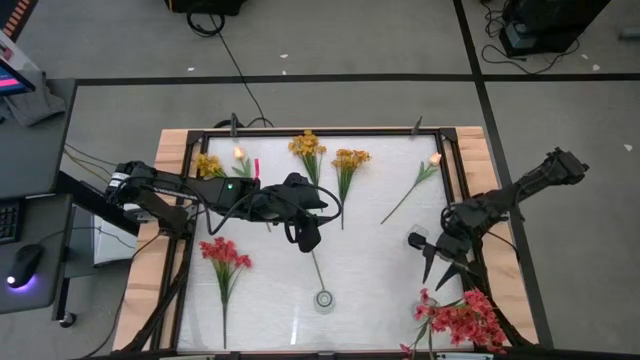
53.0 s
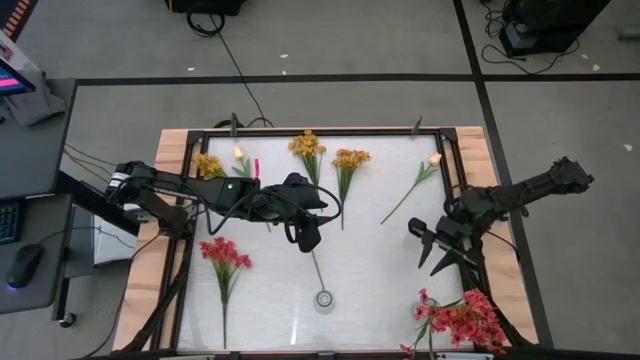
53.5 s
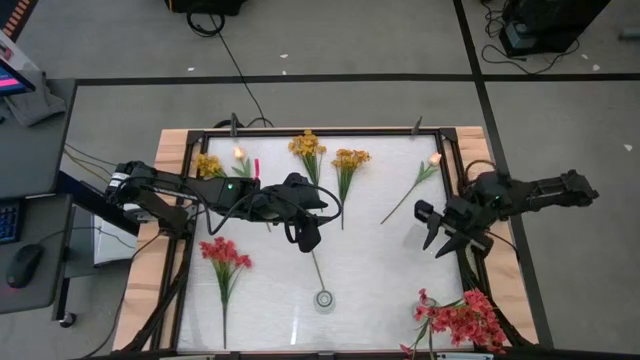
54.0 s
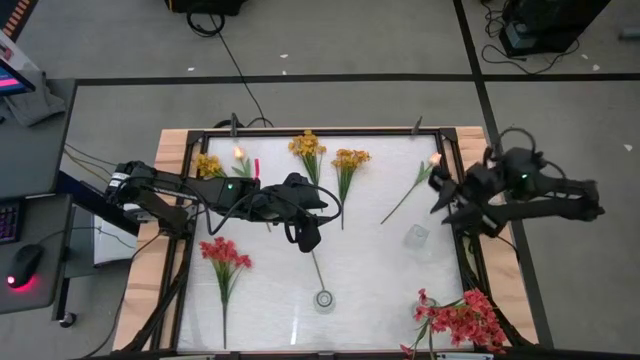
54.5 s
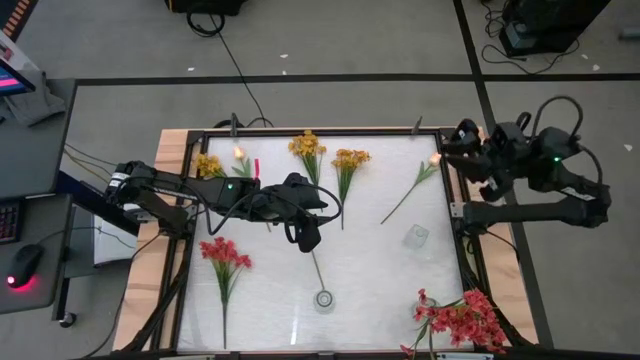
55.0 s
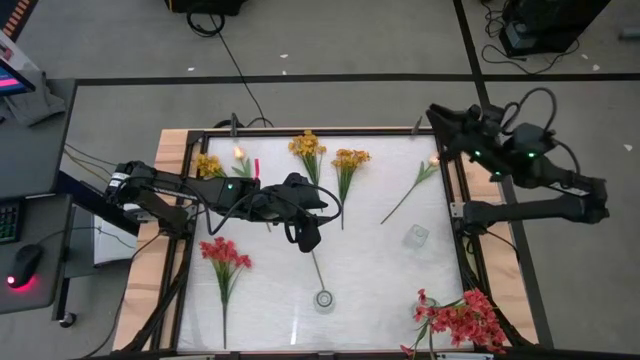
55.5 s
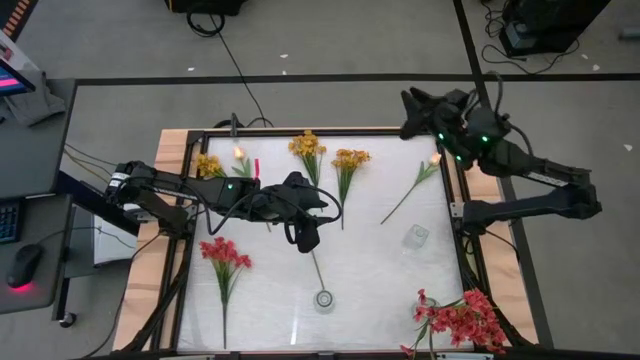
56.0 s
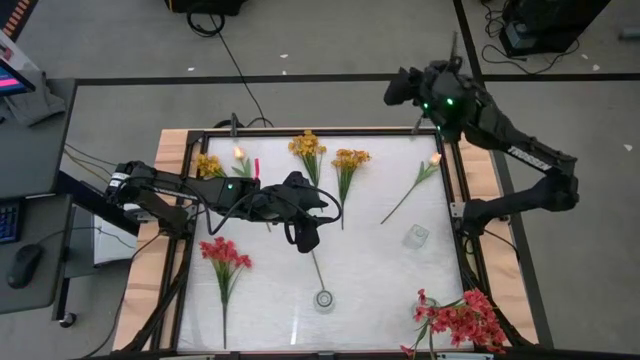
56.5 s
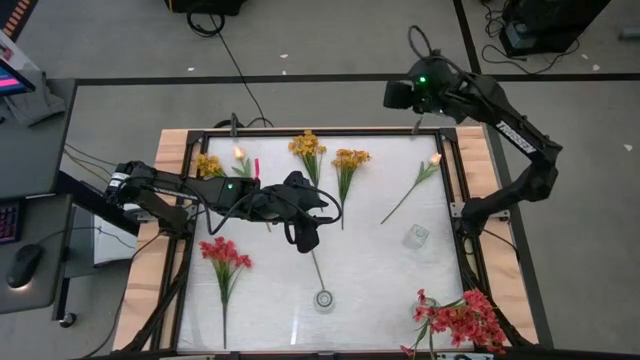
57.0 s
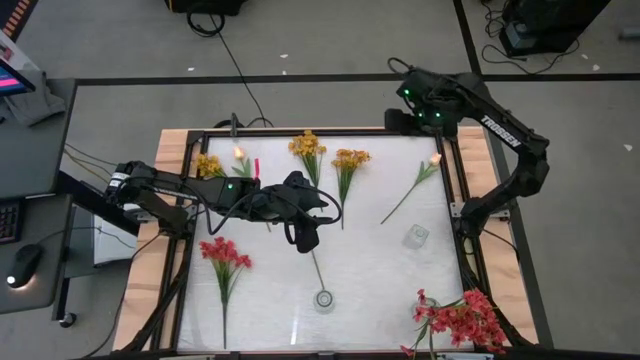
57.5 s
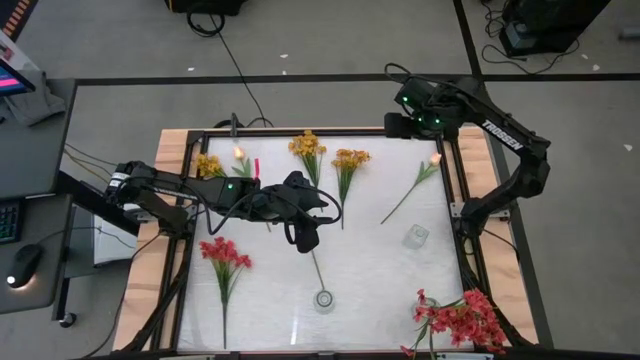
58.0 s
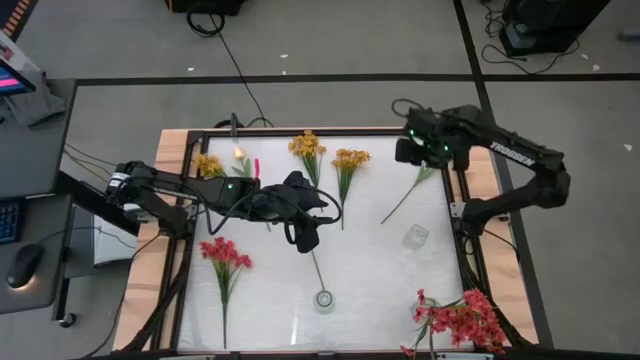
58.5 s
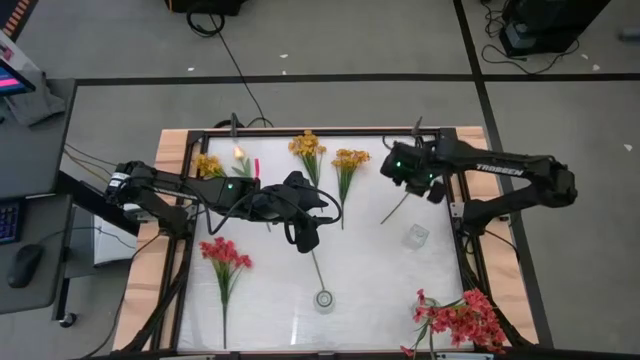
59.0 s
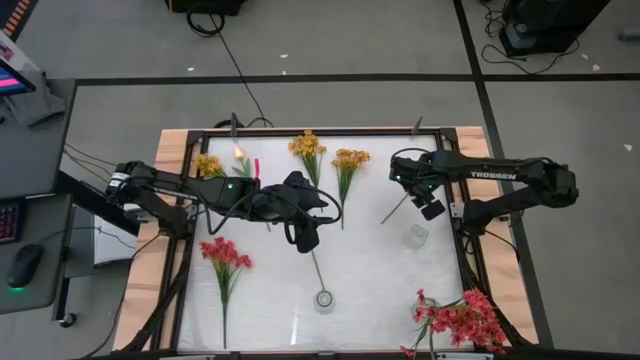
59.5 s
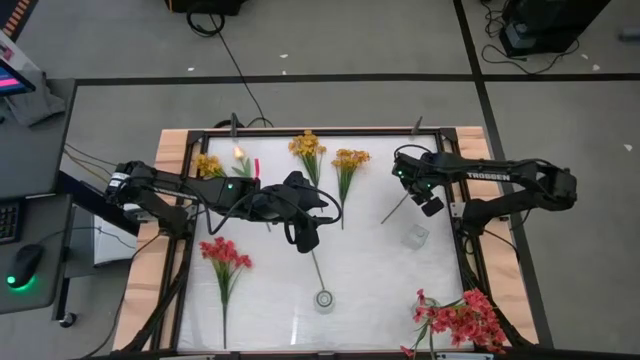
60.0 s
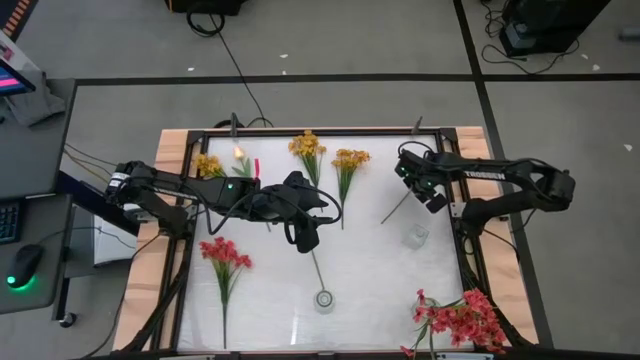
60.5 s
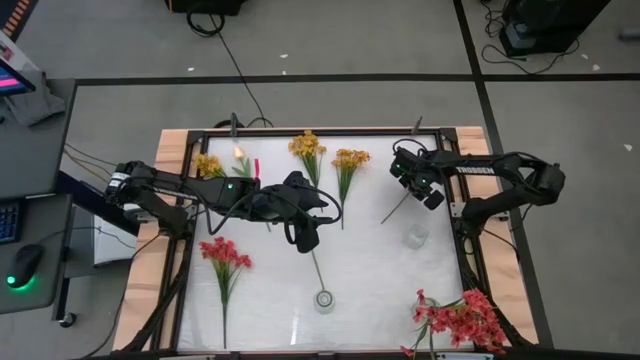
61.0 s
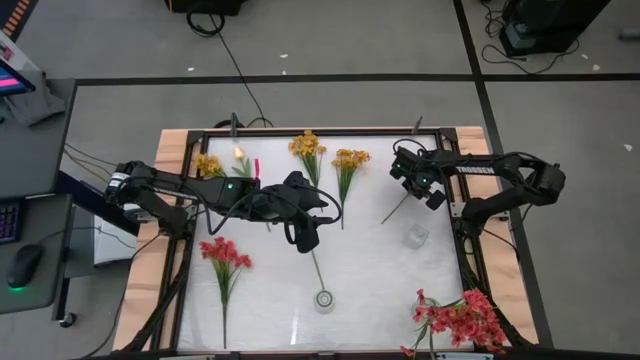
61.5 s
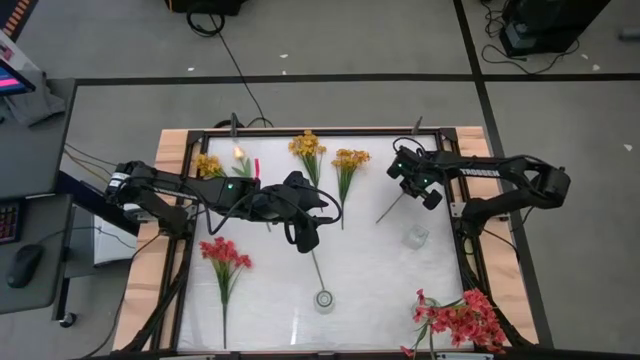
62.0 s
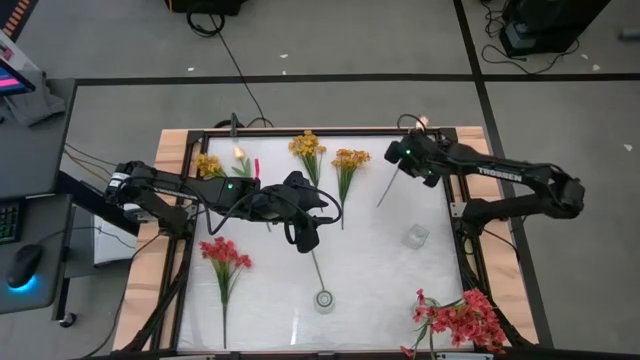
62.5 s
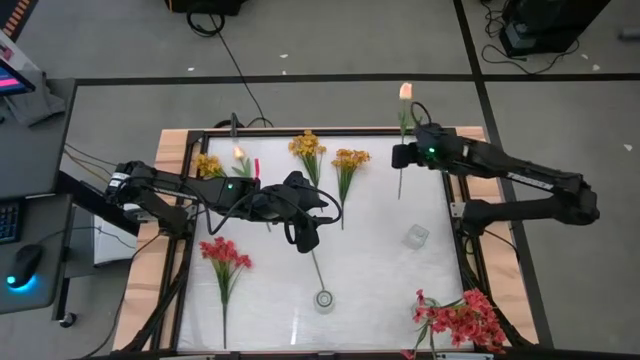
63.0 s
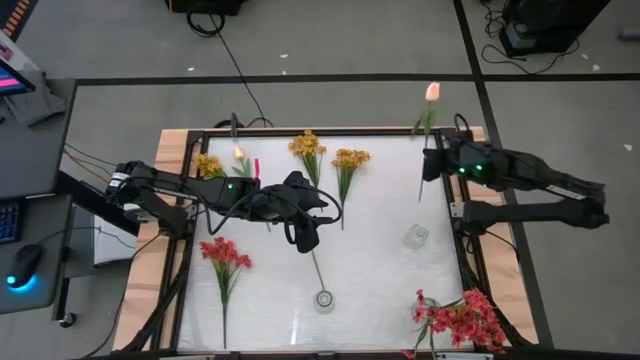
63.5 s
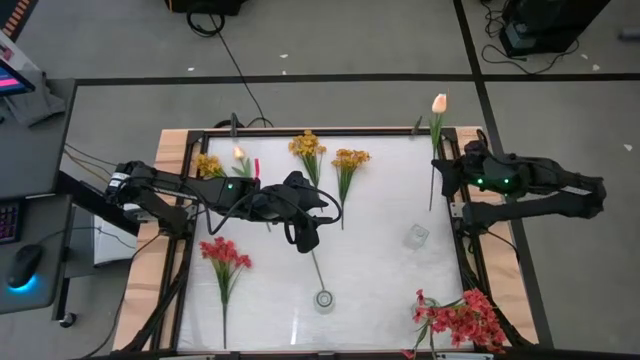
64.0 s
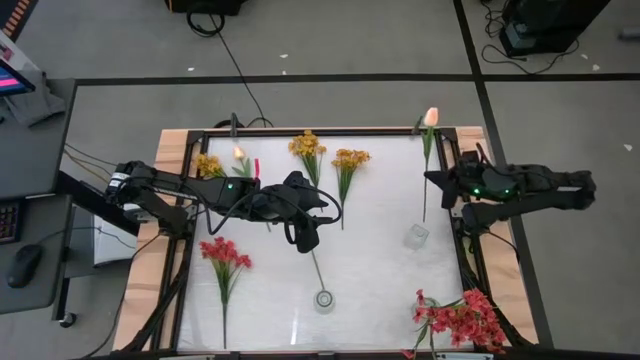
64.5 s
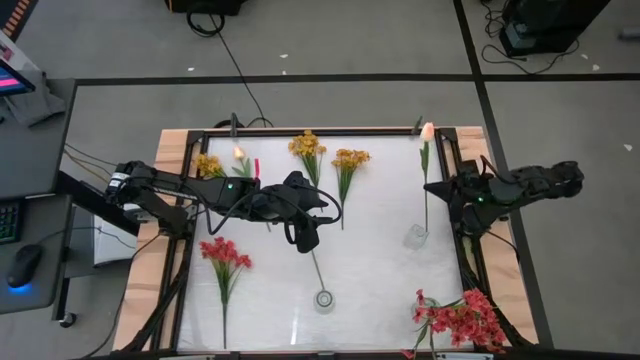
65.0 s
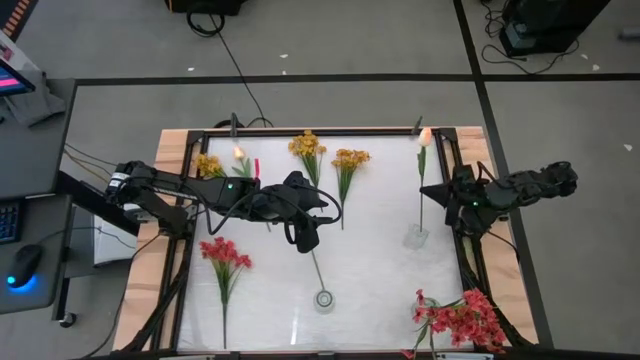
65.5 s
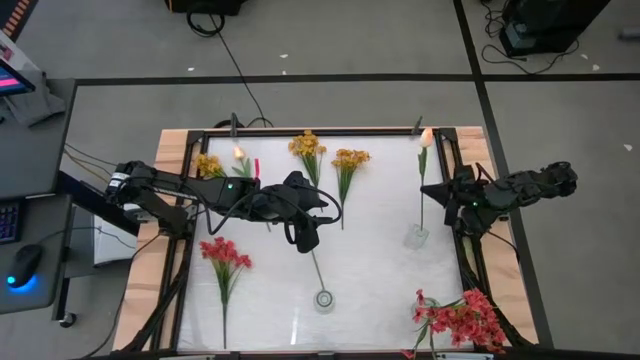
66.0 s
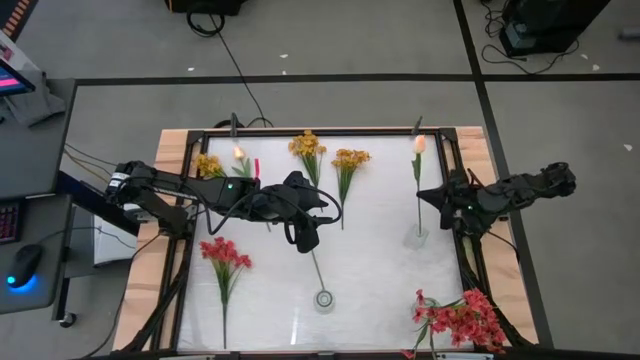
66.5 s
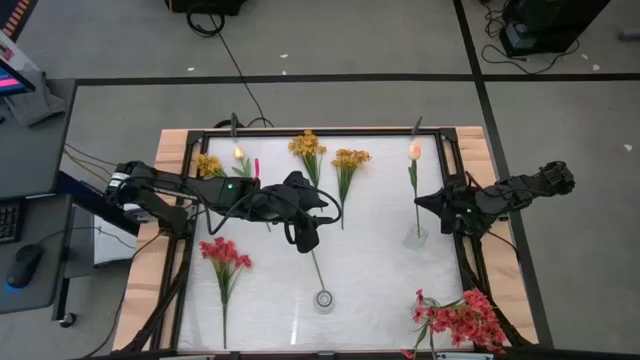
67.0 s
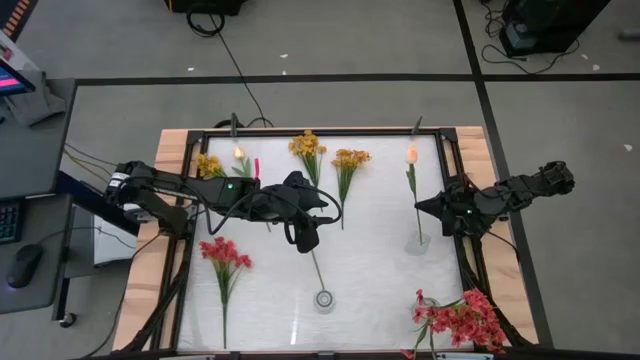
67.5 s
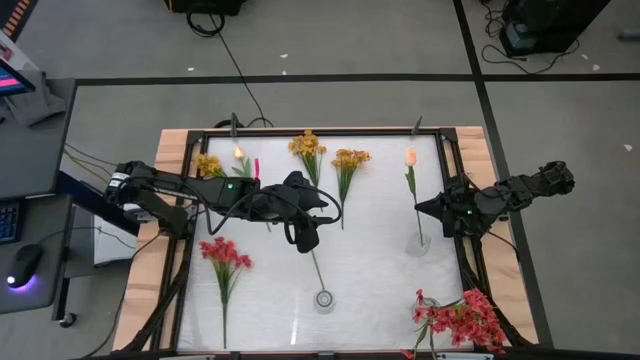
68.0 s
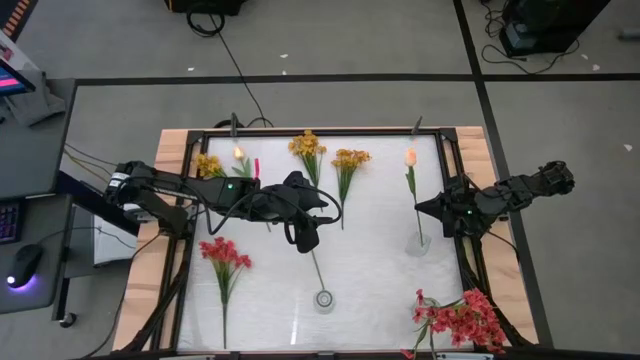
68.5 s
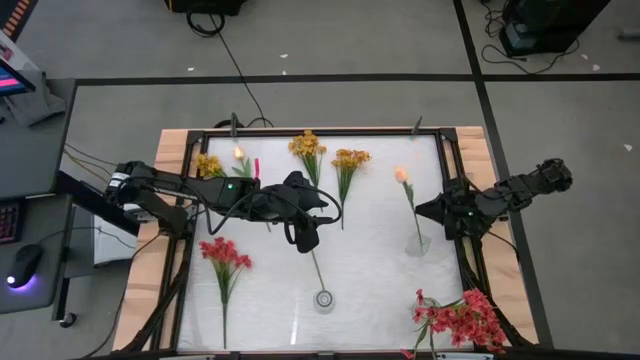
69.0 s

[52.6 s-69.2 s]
Task: Sort flowers into vase by color
Put the top right light pink flower into the top transparent vase

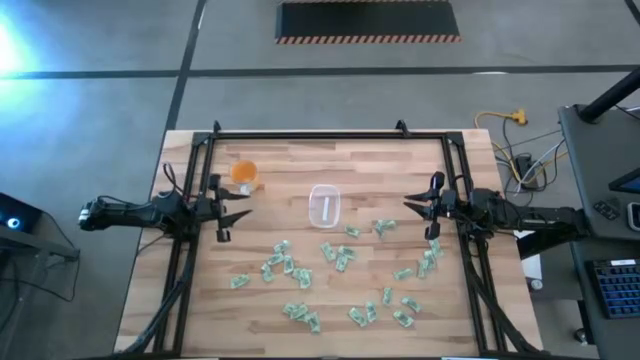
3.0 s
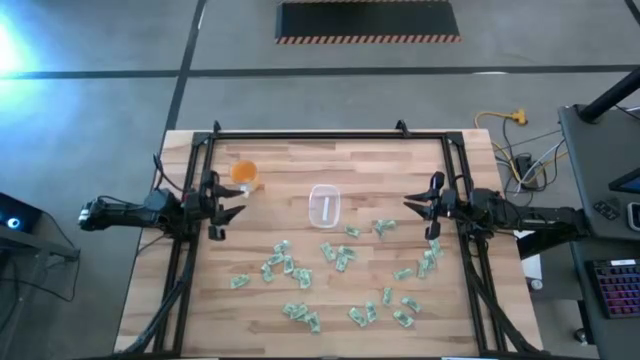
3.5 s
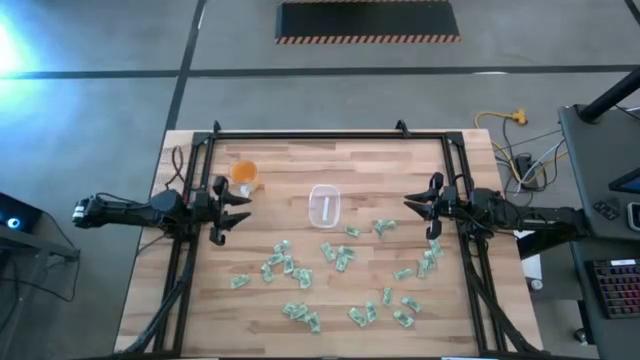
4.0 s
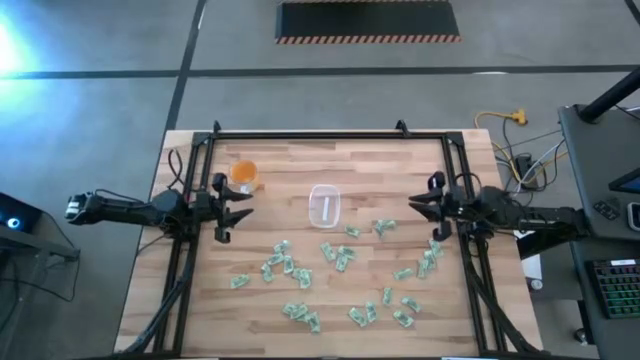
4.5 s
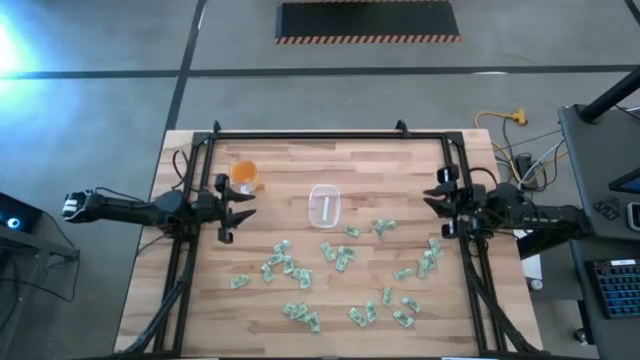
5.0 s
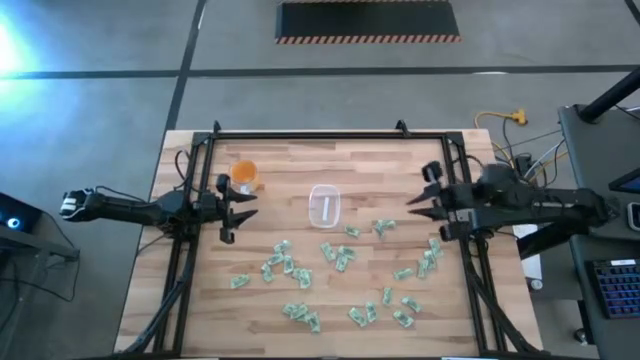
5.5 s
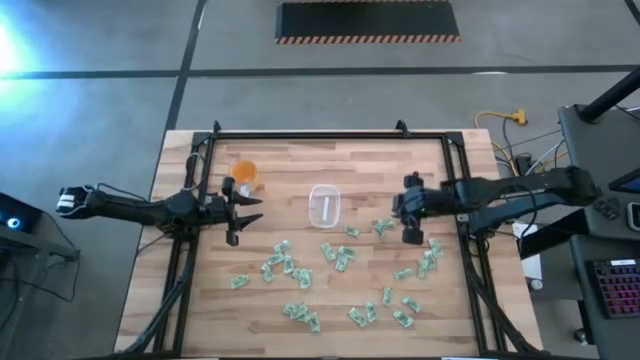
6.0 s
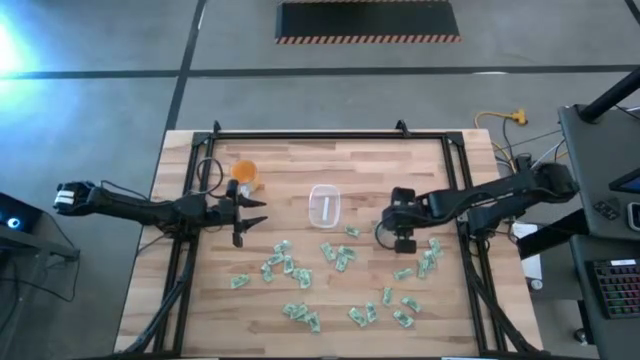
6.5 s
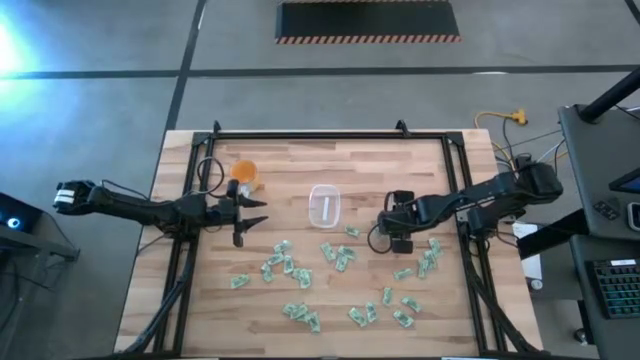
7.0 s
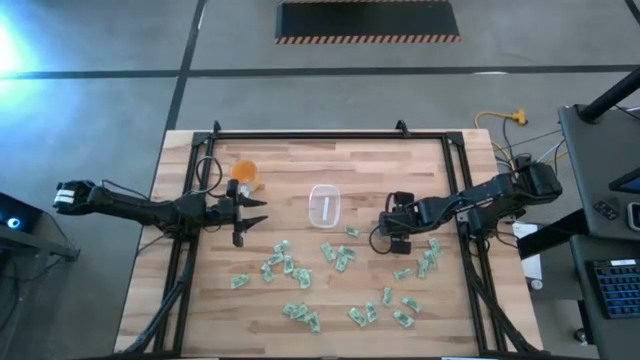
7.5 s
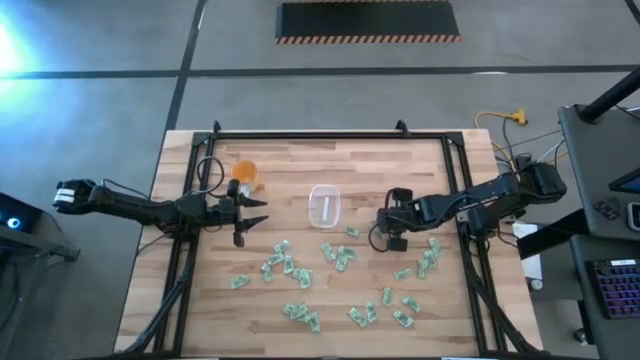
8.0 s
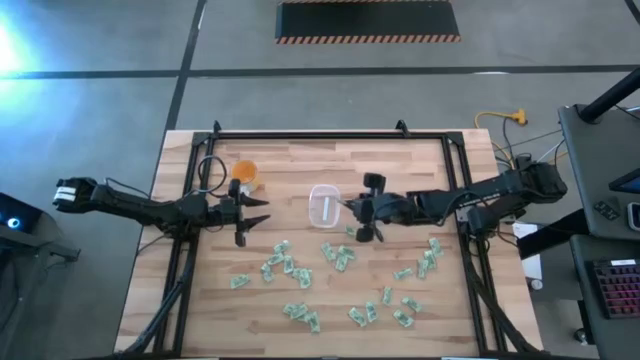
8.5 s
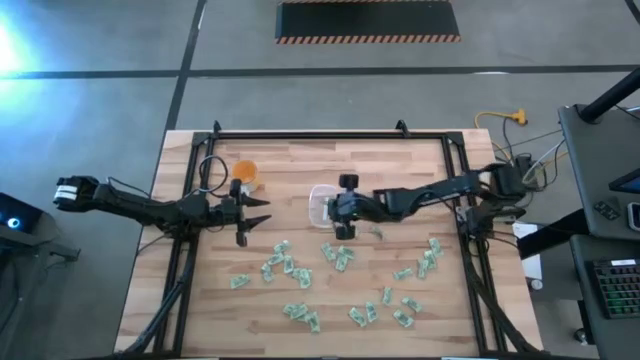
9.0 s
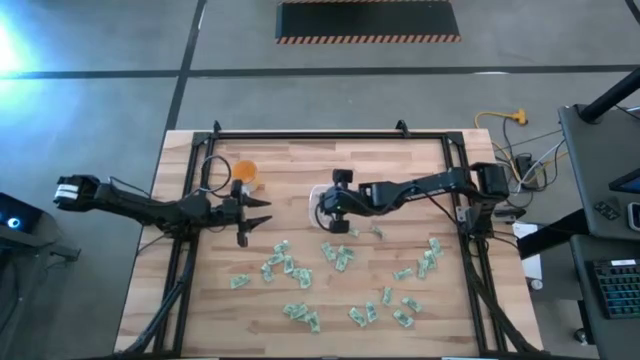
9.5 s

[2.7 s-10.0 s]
Task: Pick and place Stevia / Truvia into bins
Put the stevia packet into the bin
